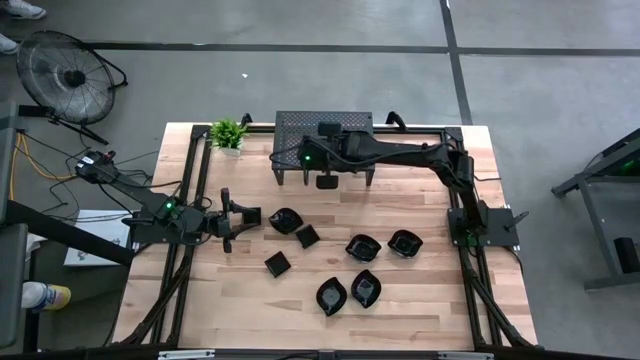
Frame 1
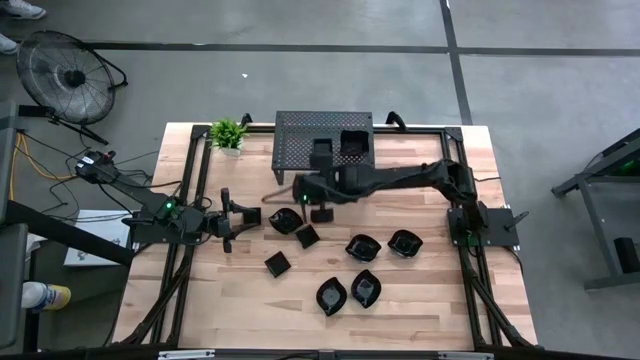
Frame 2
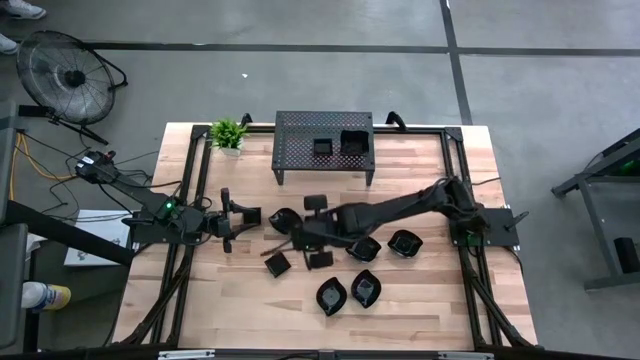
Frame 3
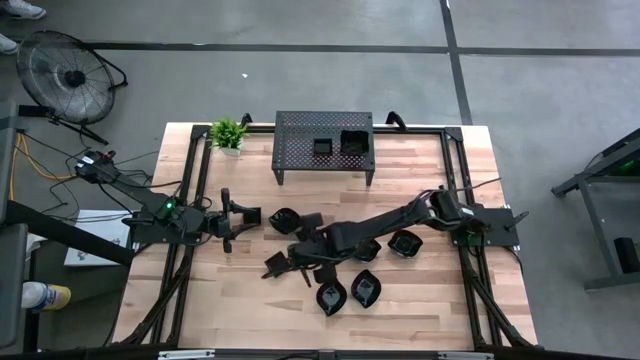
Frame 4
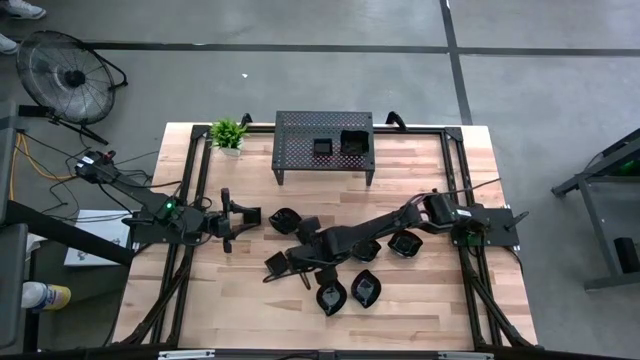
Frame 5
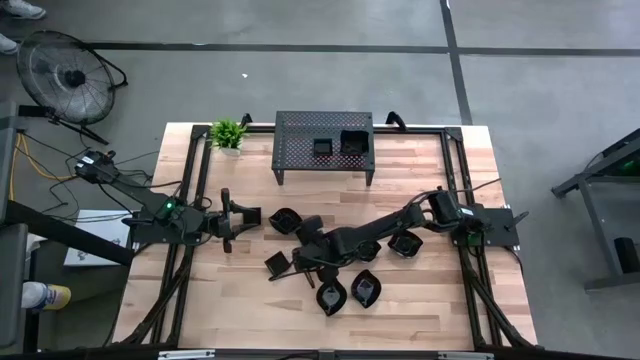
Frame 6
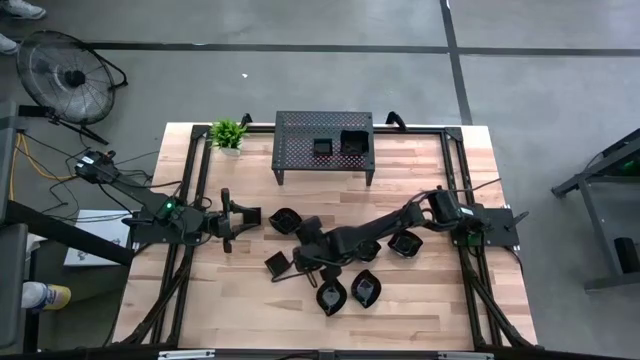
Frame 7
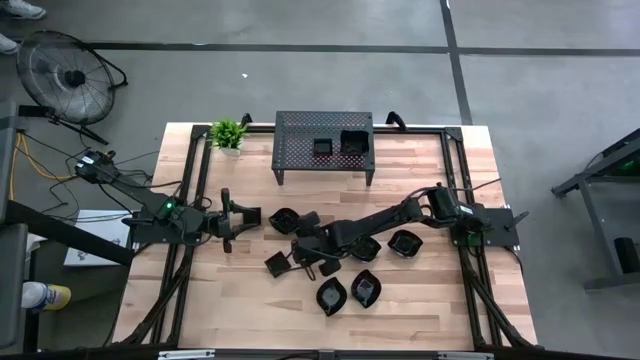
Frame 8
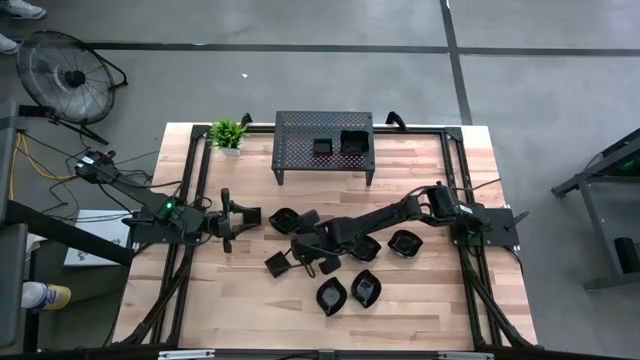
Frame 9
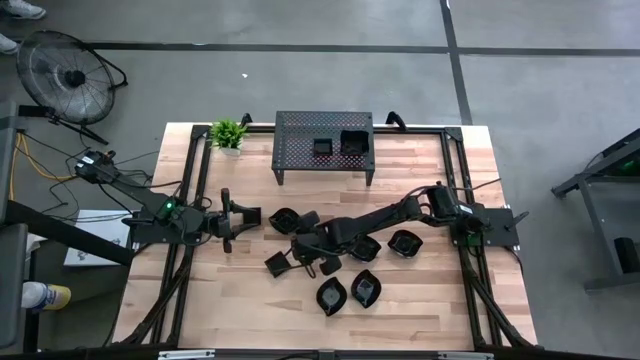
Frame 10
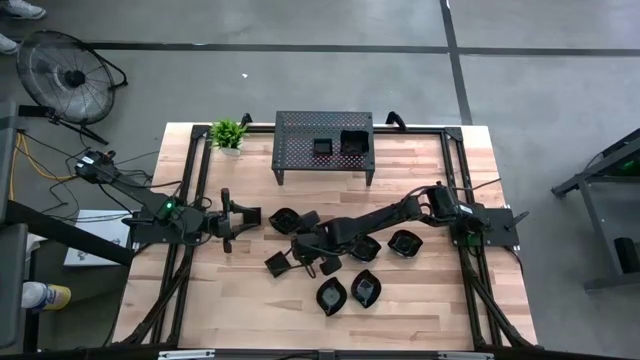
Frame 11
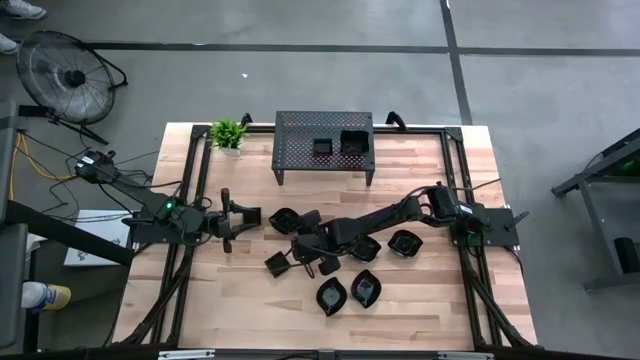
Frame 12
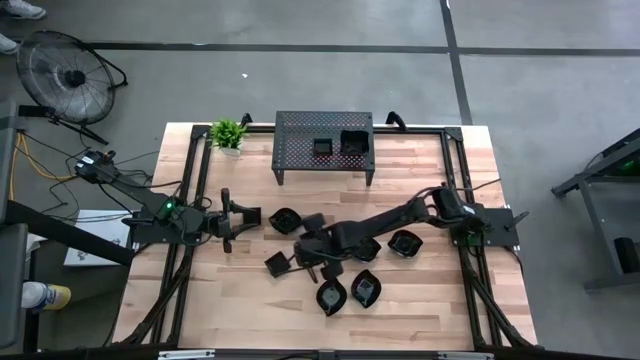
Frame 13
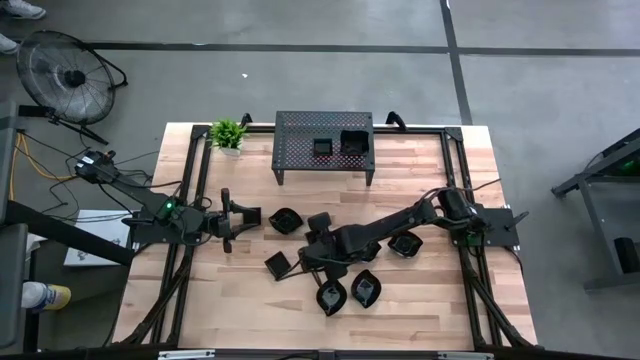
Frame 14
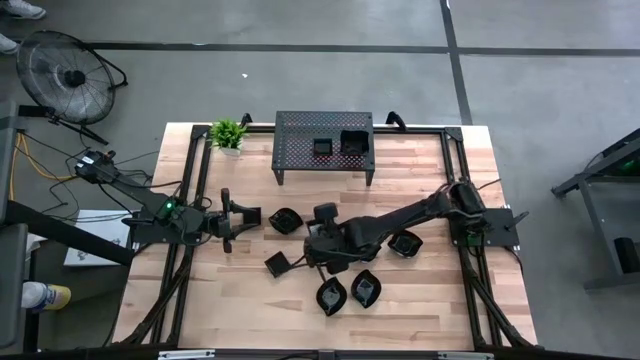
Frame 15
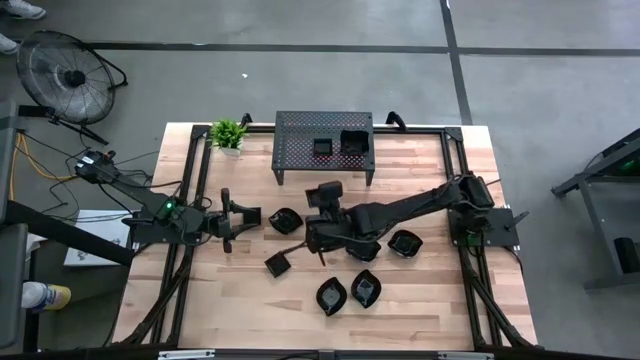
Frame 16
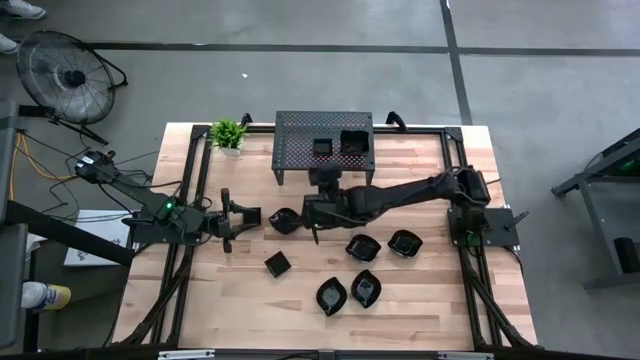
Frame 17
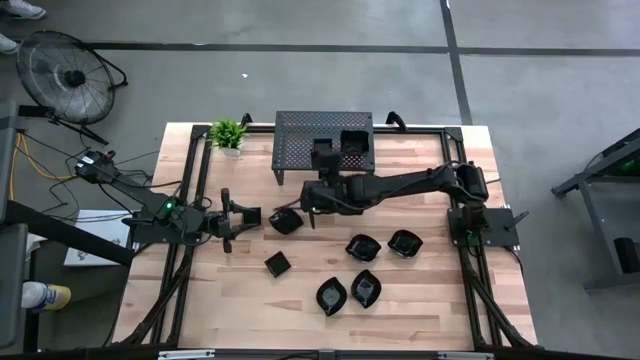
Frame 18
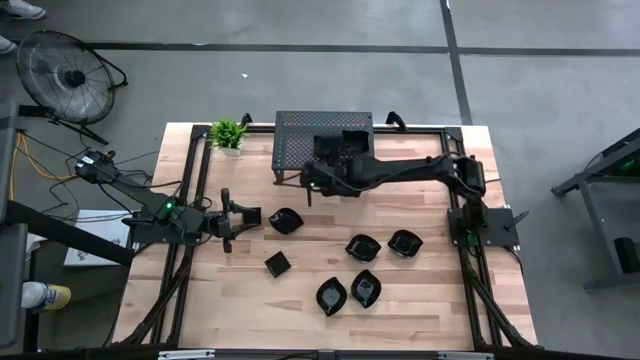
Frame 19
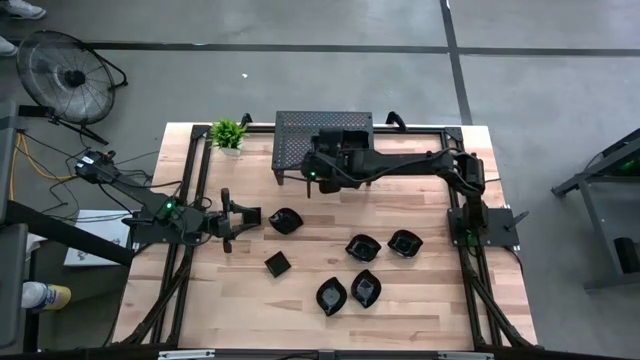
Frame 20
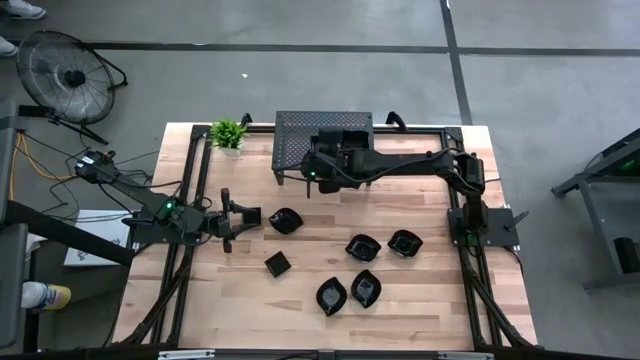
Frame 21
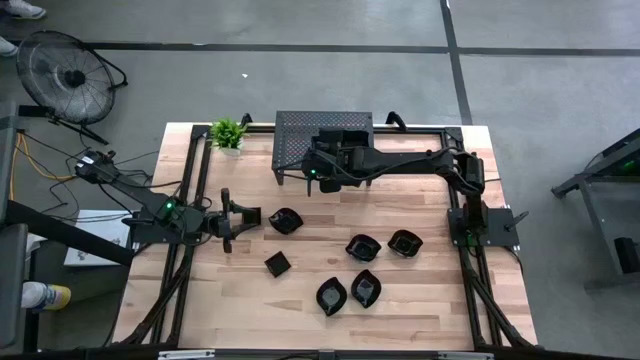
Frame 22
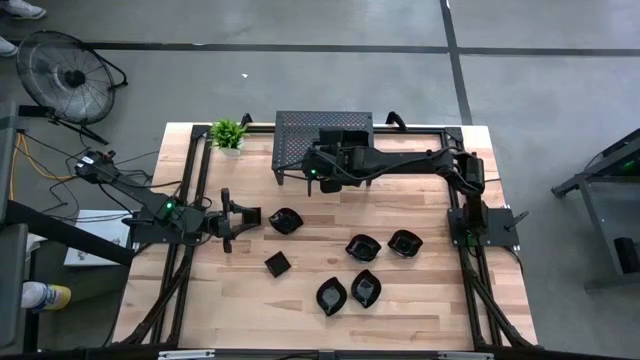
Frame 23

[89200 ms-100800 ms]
Task: Pick & Place Mini shaped plates
Stack the square plate on top of the square plate on the shelf

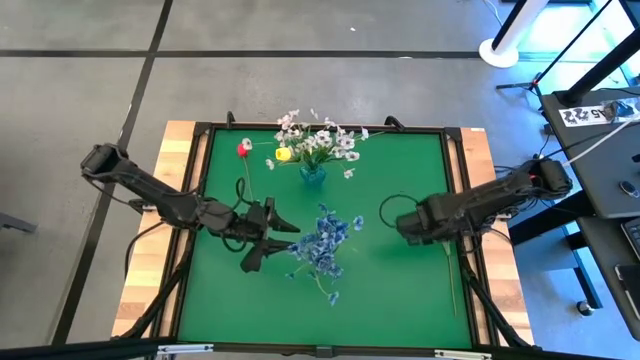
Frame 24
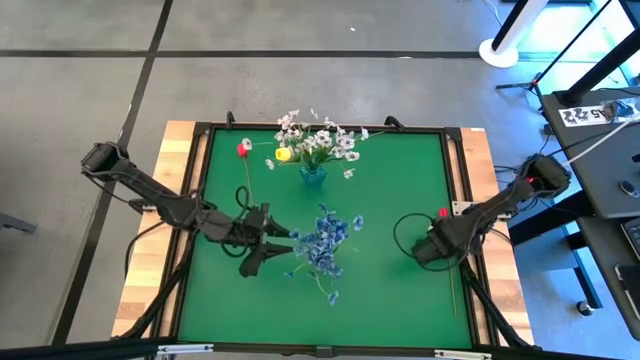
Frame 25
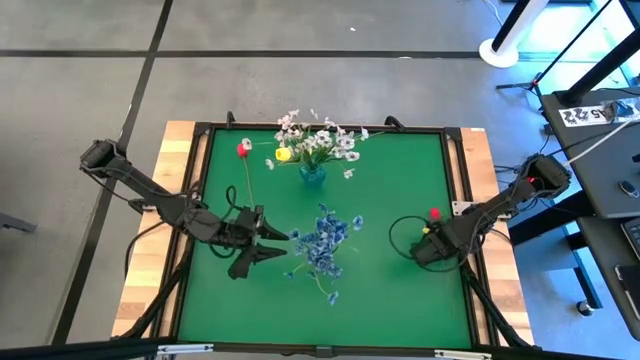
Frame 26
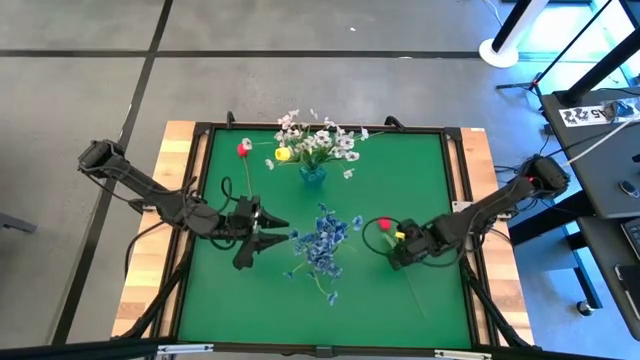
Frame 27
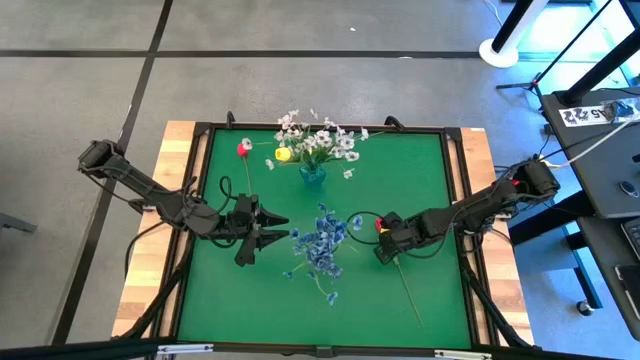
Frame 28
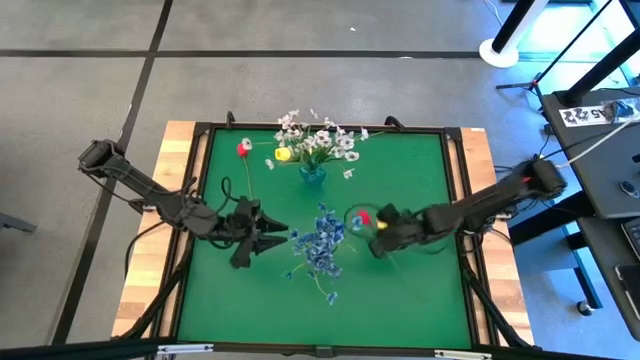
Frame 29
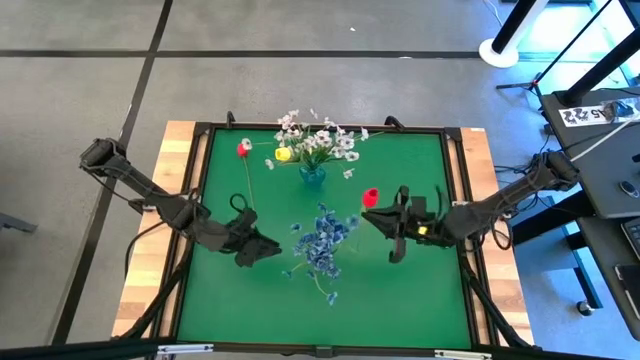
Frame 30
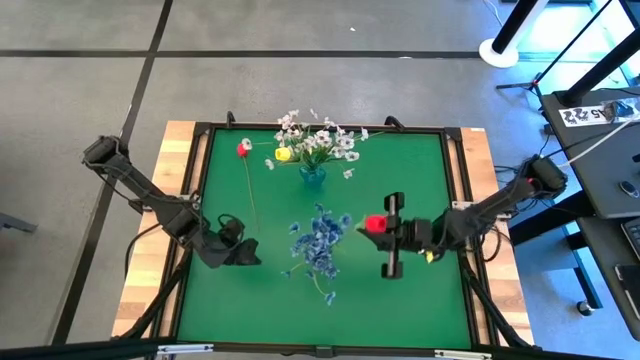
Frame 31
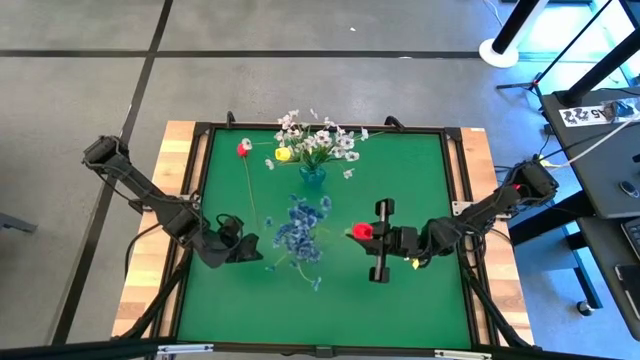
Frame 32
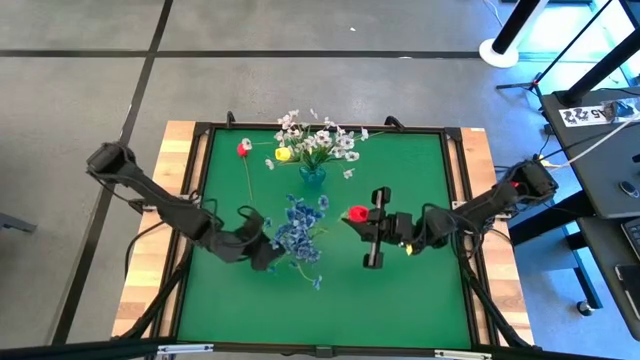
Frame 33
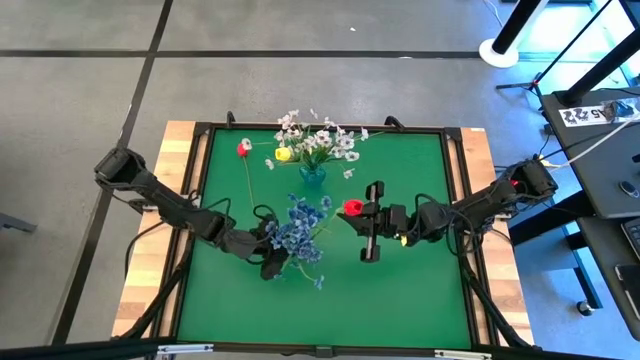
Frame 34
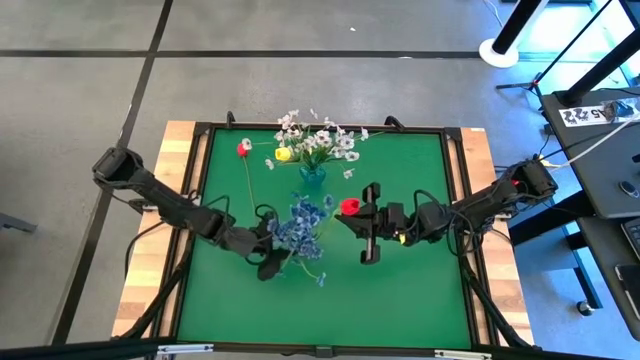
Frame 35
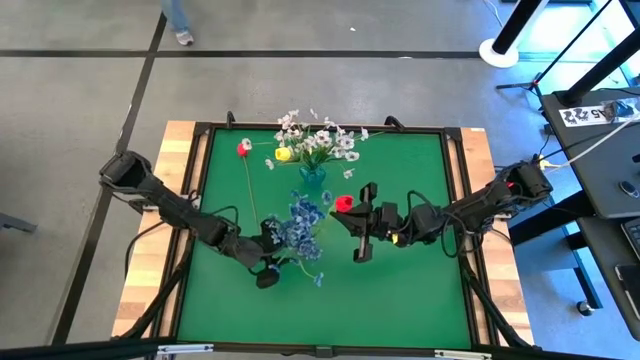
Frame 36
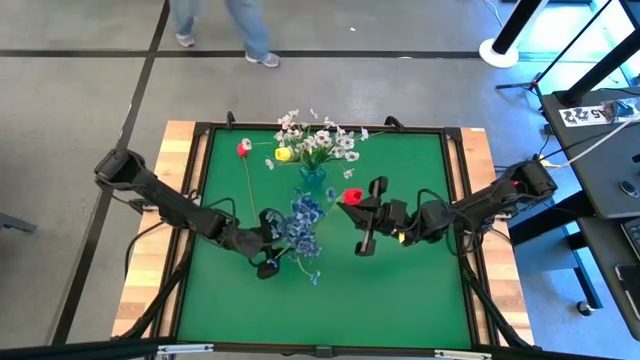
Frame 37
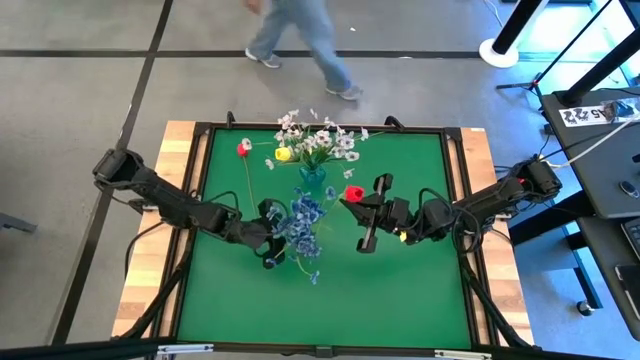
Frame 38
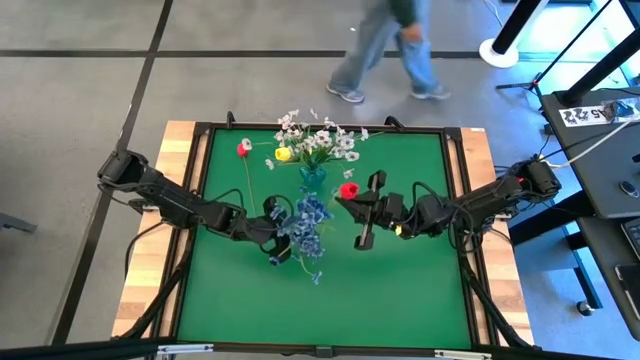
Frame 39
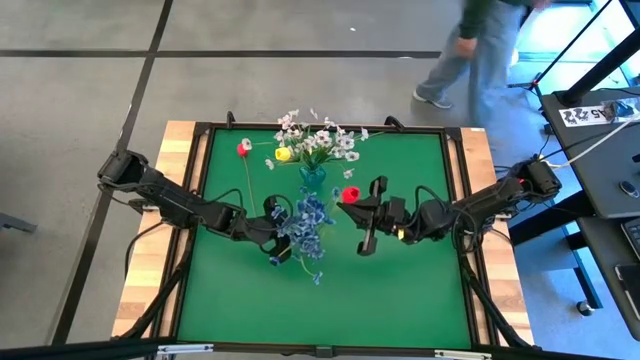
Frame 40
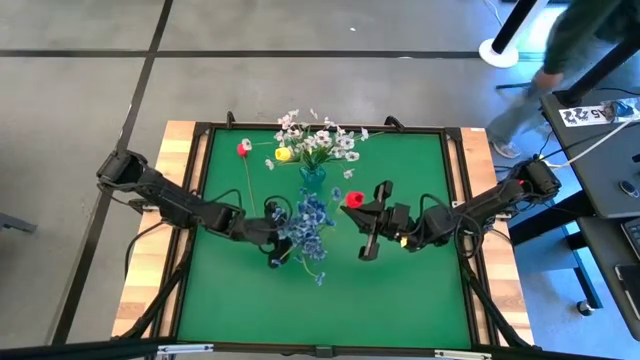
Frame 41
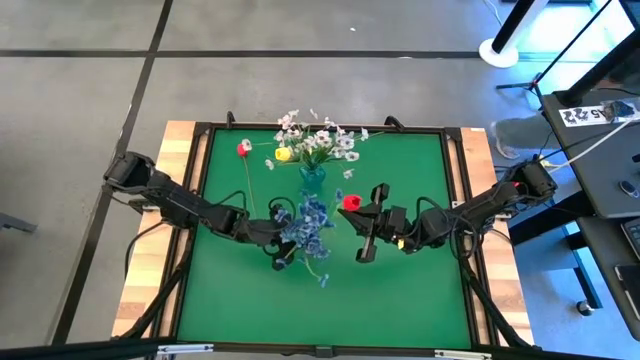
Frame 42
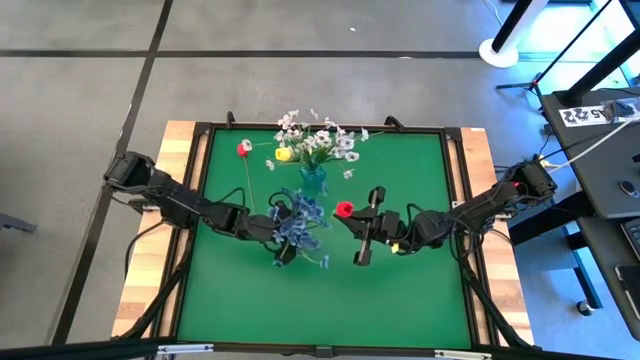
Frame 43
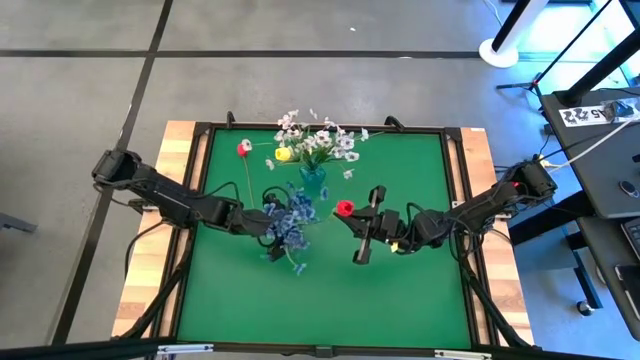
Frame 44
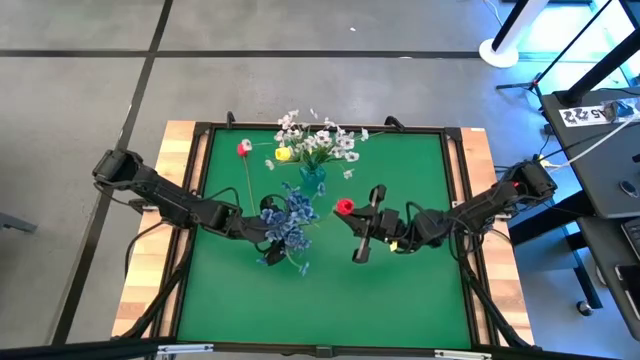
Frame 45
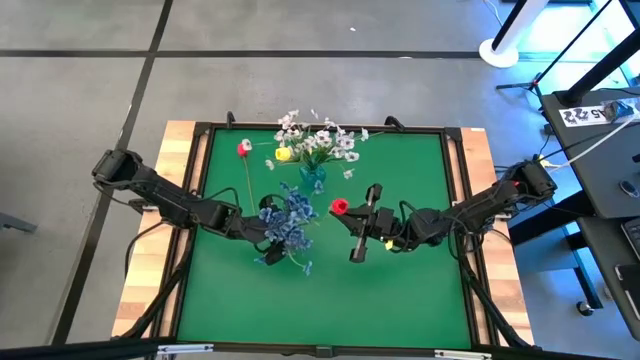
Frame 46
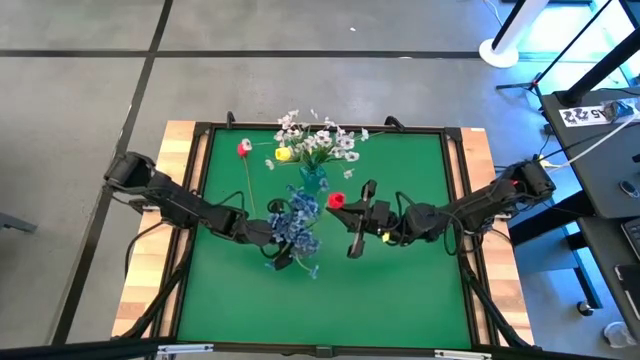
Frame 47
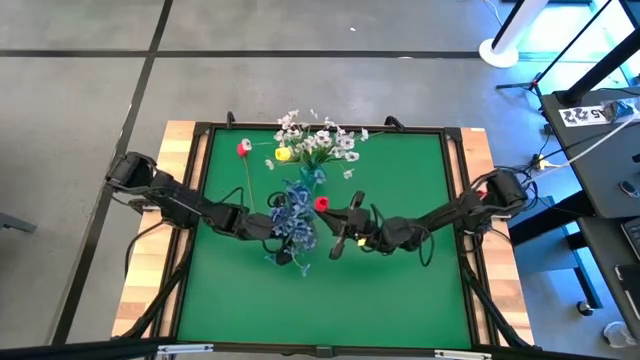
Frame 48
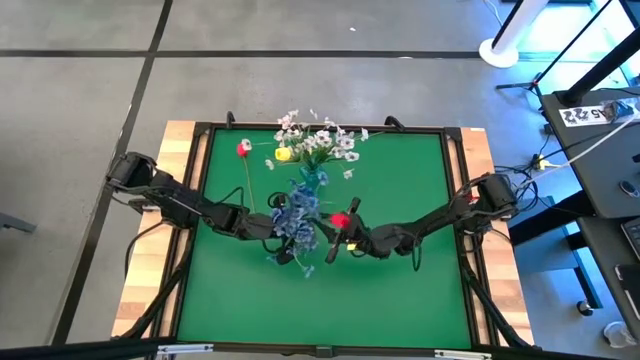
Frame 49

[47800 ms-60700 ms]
Task: Sort flowers into vase by color
Put the bottom red tulip into the violet vase
